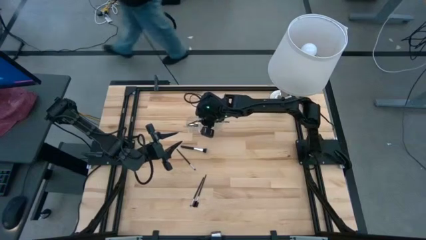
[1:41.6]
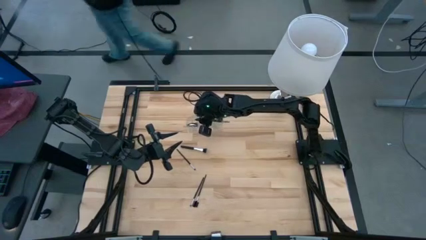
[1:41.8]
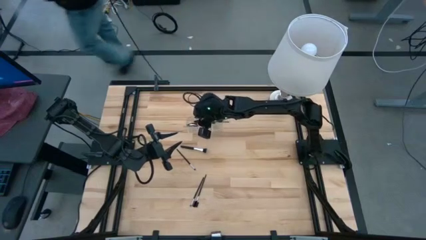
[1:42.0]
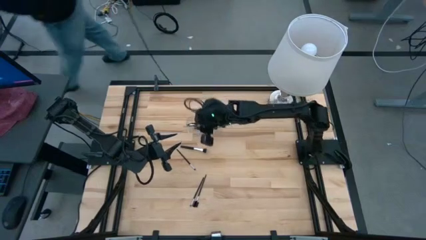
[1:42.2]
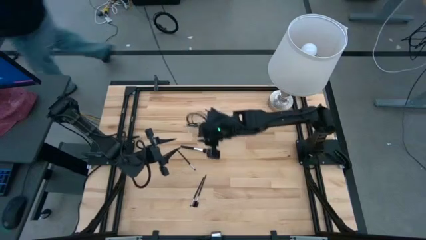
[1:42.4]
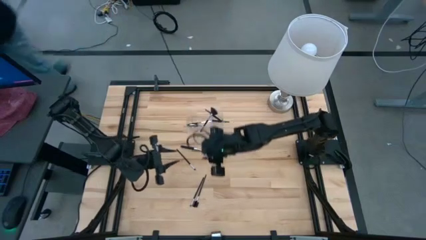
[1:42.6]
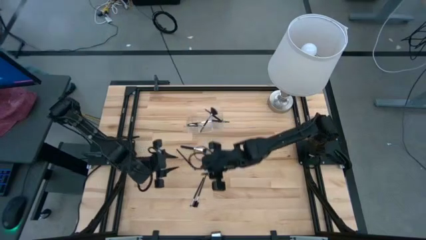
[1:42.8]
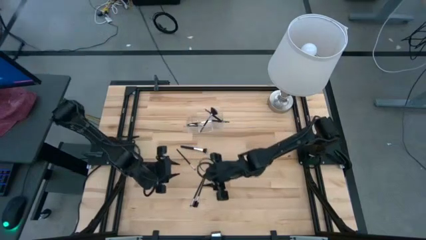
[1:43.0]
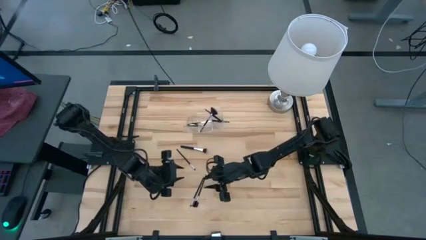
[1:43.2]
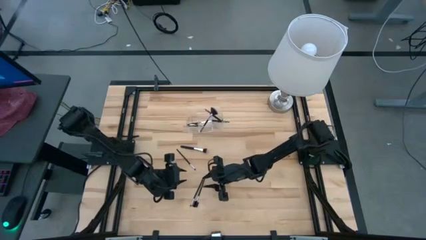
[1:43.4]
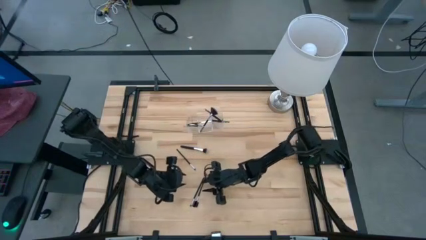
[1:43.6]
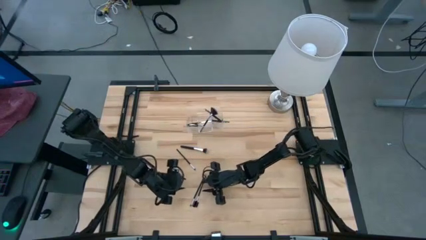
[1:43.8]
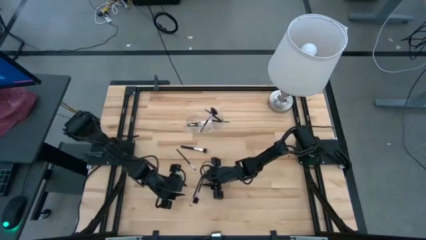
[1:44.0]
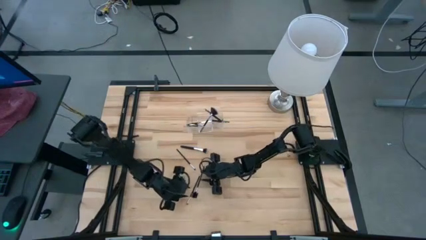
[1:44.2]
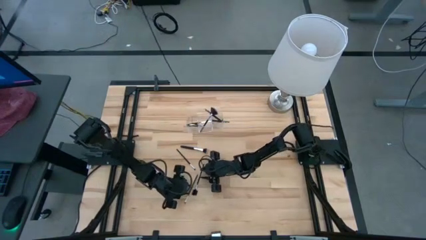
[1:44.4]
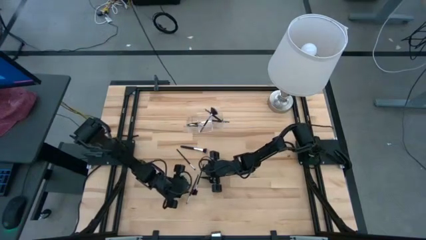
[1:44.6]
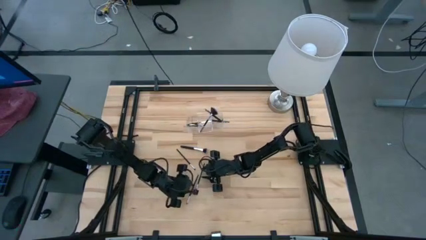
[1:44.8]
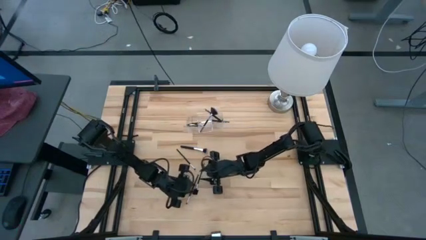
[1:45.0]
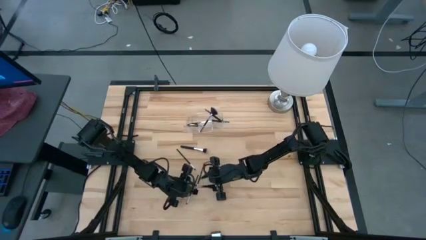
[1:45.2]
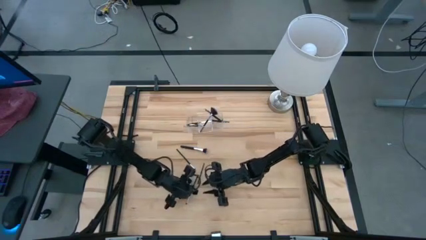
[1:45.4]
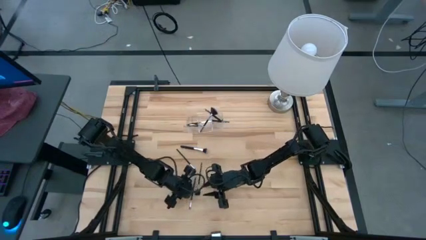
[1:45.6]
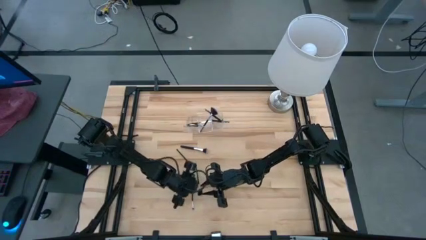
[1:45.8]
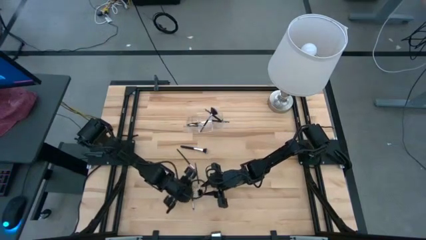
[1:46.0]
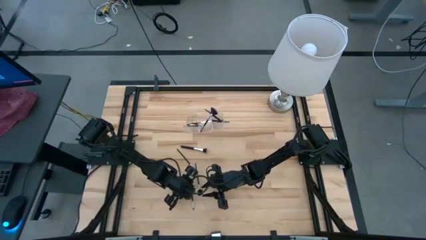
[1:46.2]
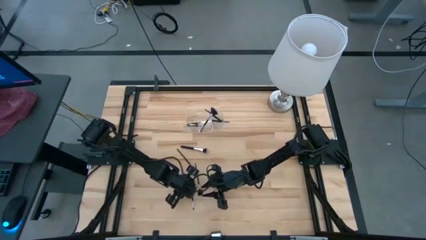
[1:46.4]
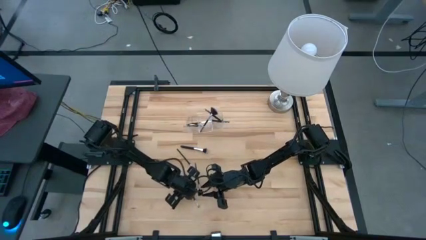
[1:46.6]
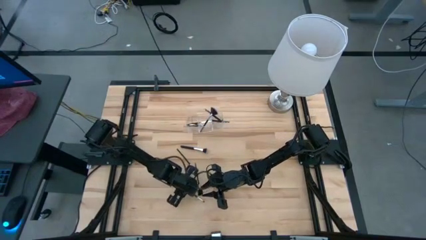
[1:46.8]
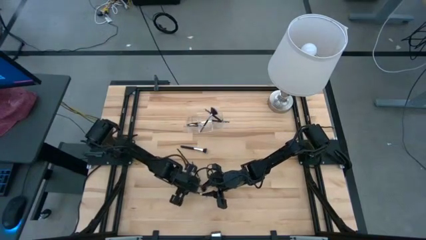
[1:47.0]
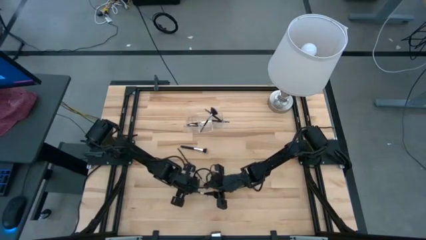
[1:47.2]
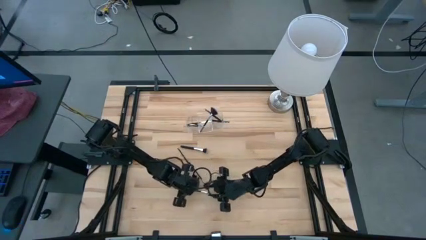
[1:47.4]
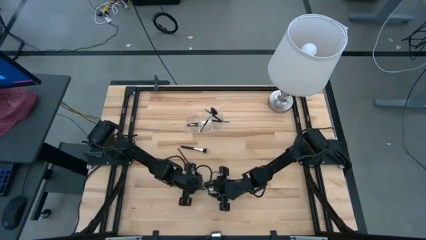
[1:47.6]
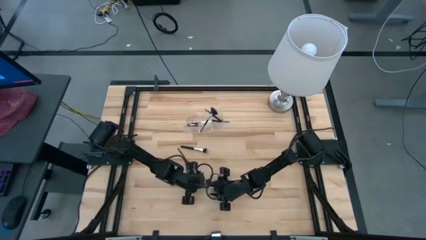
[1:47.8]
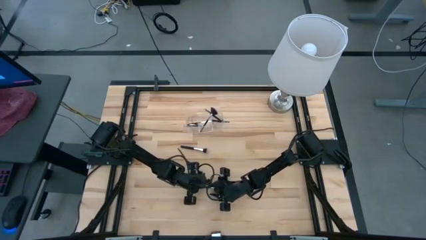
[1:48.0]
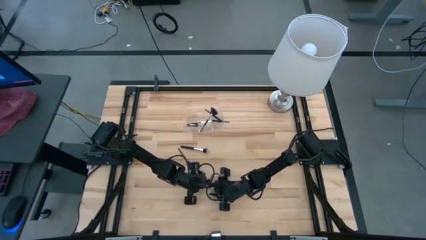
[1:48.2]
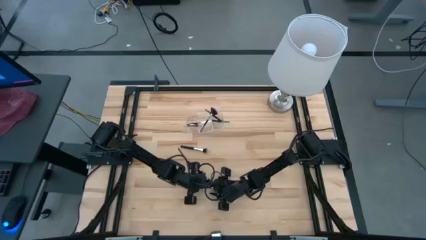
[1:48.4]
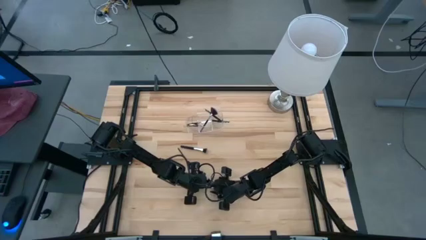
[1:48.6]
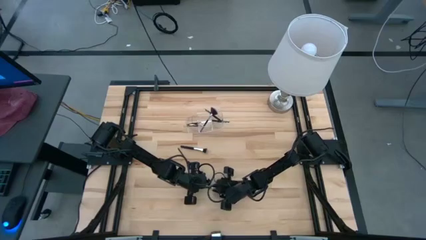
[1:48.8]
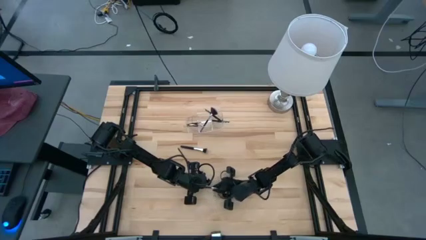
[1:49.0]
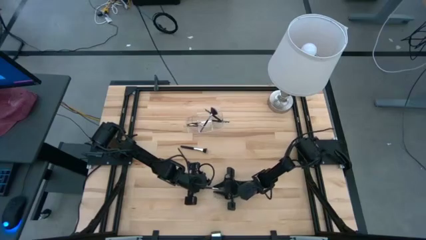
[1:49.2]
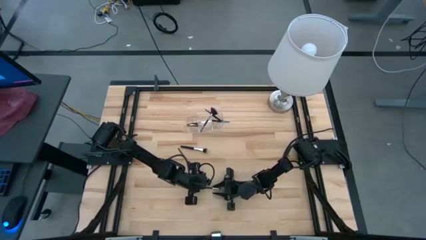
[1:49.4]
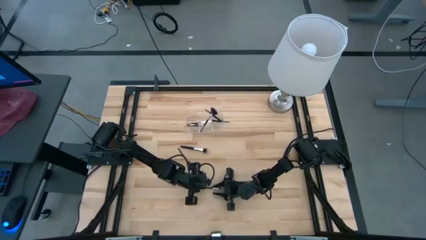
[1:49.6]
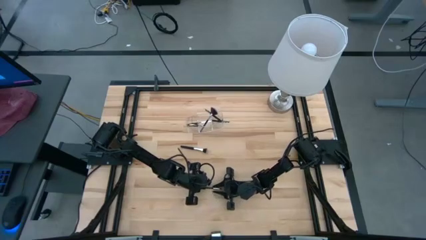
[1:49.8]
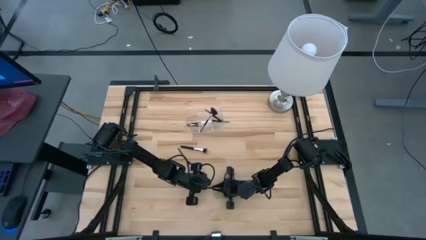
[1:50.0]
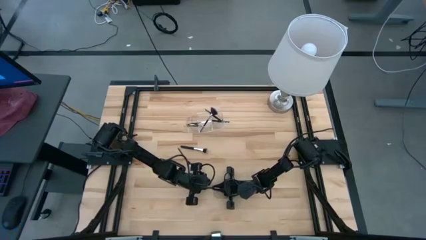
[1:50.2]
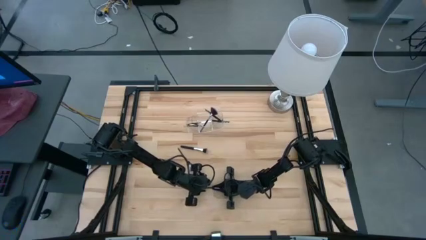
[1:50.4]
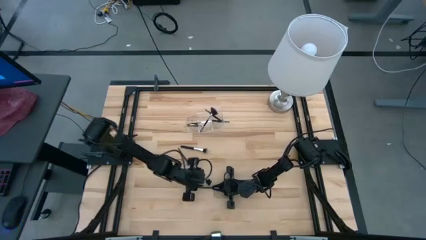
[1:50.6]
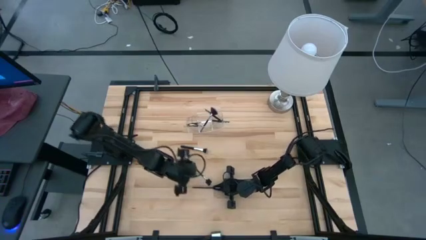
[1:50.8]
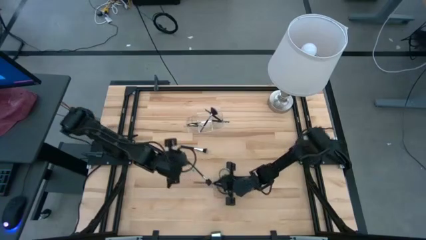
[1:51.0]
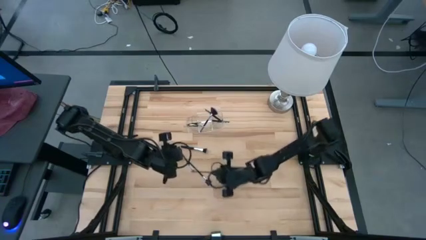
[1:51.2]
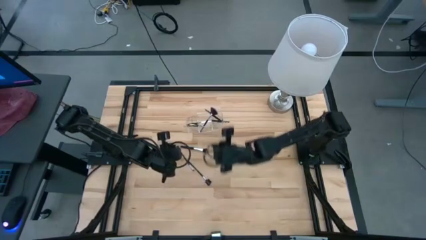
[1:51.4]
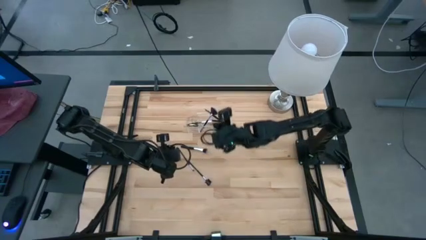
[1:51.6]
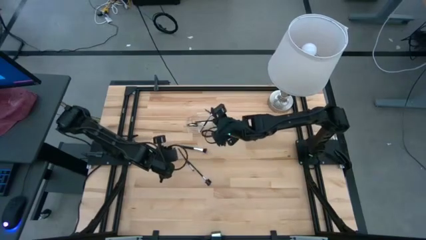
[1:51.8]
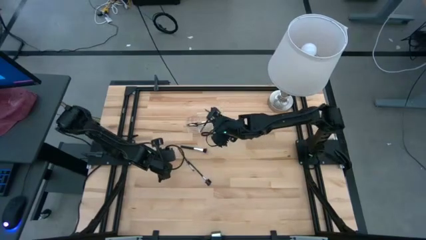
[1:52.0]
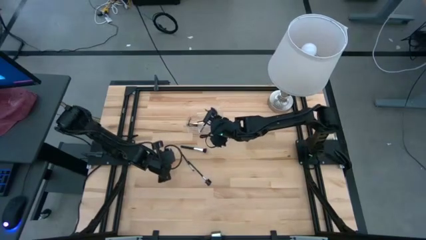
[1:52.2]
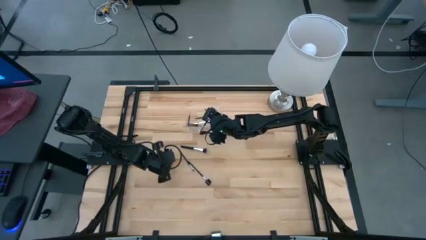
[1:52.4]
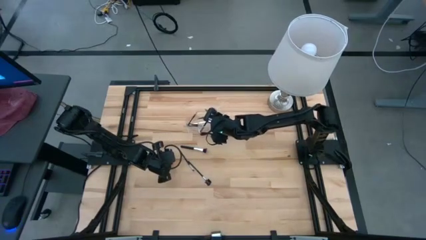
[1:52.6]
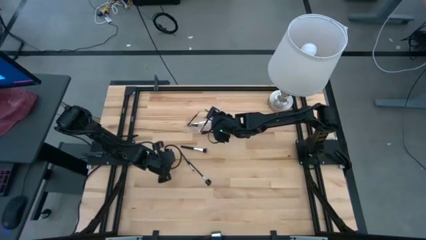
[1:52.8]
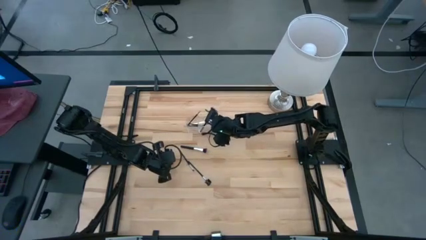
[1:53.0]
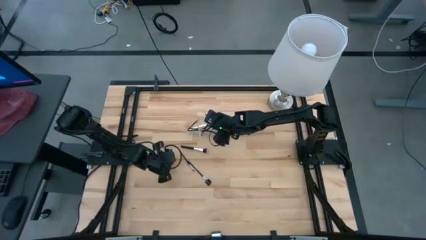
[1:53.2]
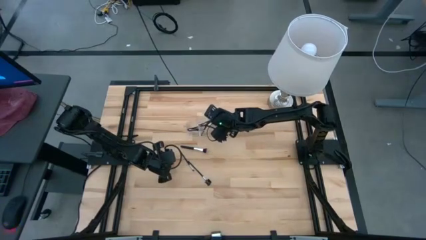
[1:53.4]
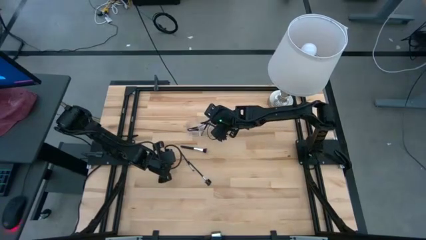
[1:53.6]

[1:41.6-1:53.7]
Task: Put items in baskets/containers
Put the black eyeshadow brush into the transparent organizer

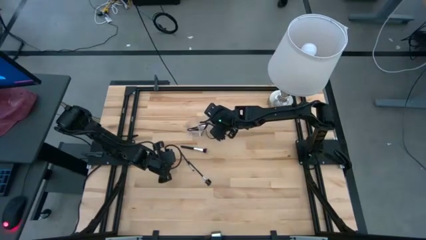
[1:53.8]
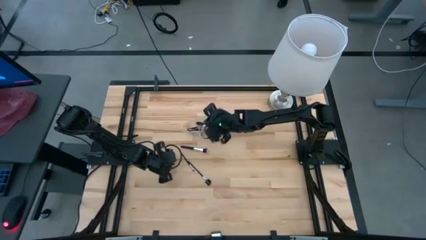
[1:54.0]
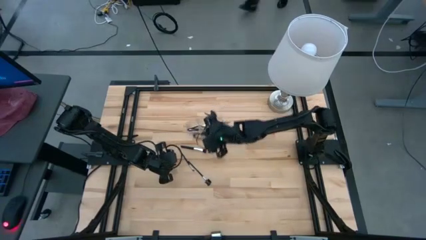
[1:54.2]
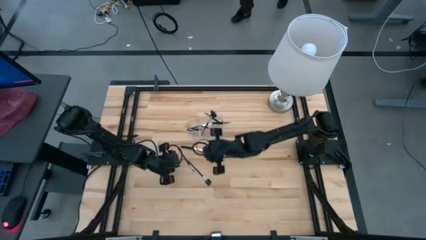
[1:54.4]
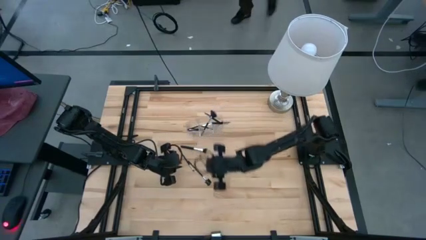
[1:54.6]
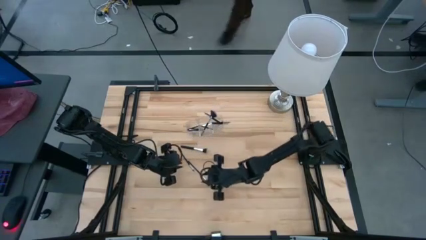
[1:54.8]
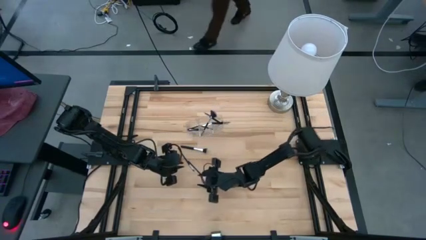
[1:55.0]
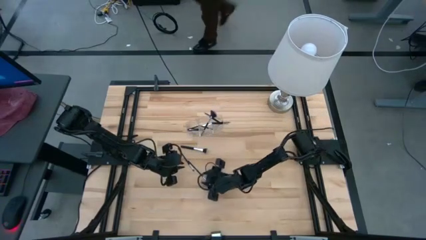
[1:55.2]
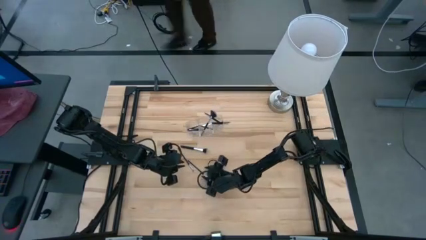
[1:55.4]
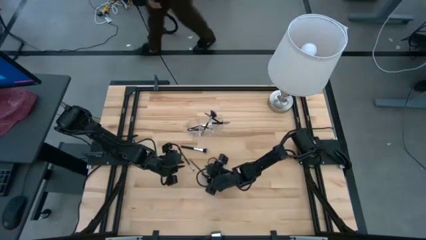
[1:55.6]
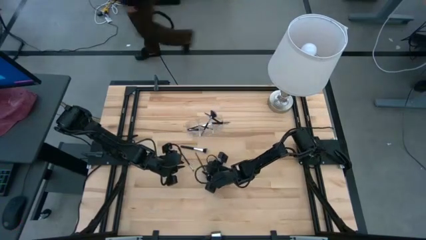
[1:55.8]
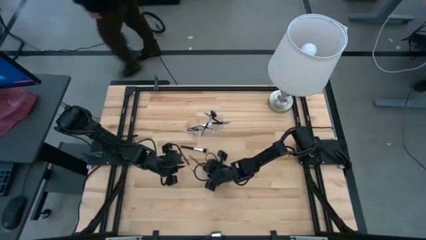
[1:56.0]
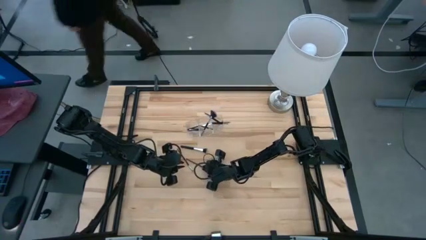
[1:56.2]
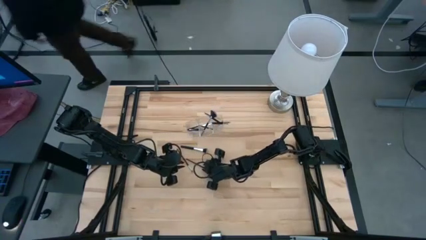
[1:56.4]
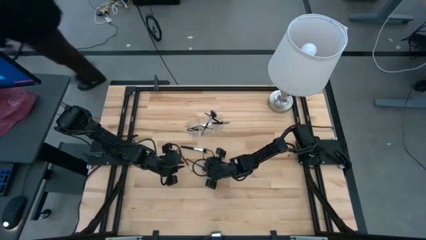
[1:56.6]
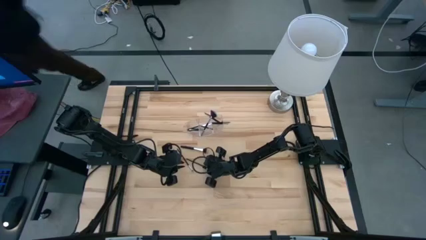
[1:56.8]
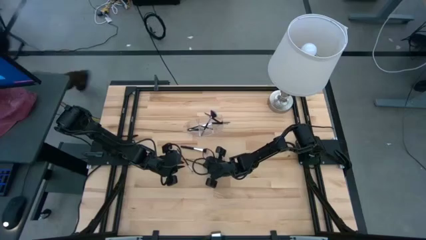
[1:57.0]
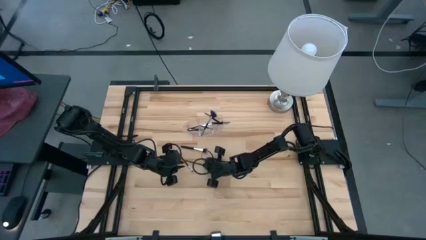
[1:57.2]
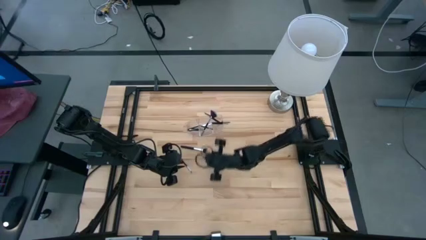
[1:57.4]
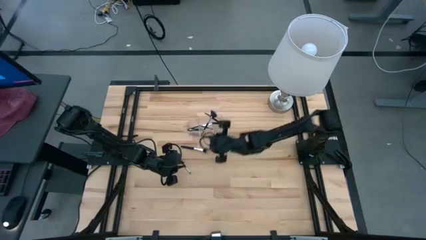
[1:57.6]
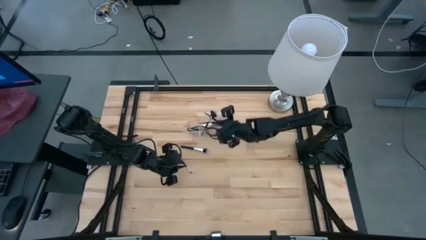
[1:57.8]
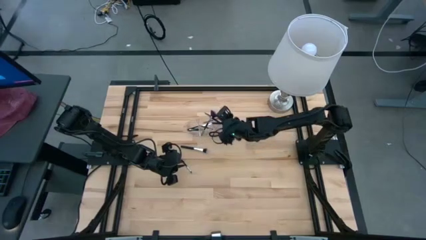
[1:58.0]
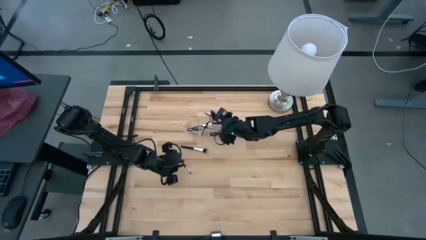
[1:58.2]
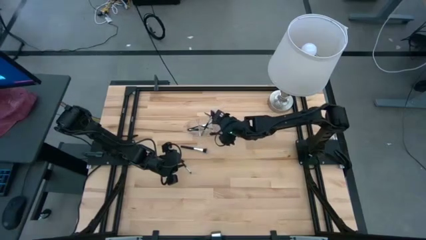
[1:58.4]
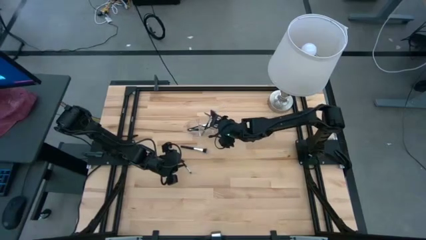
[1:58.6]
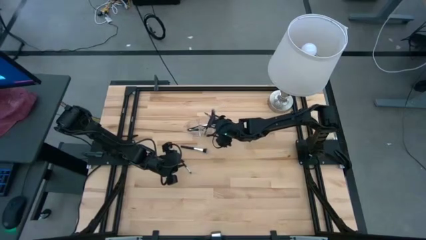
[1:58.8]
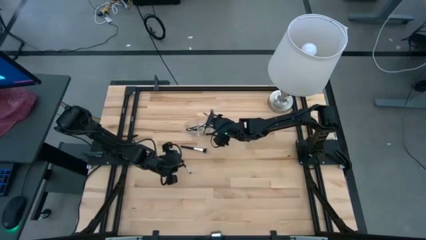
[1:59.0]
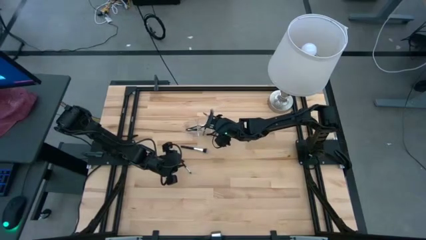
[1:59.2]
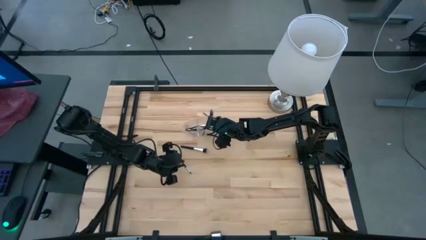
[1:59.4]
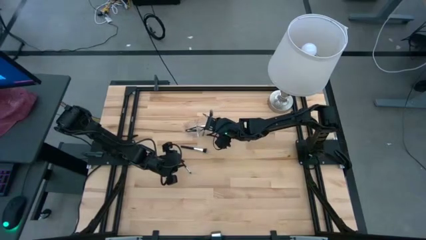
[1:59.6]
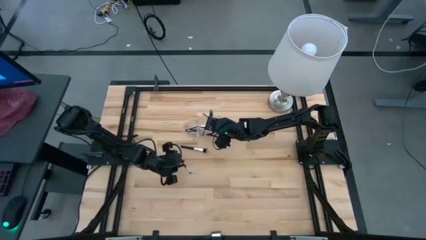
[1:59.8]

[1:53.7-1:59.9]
Put the black eyebrow brush into the transparent organizer
